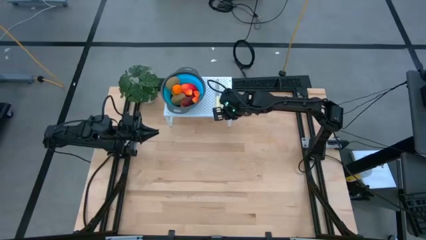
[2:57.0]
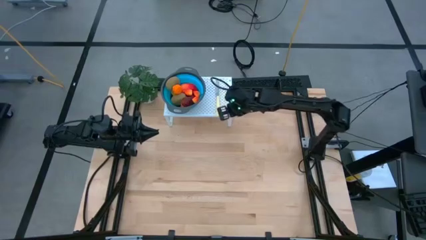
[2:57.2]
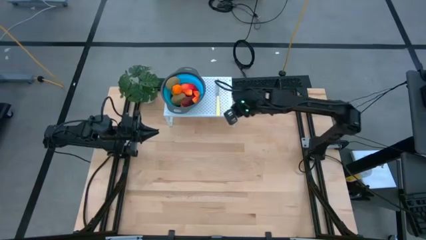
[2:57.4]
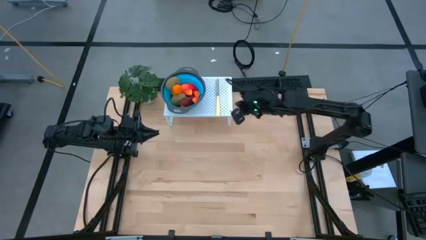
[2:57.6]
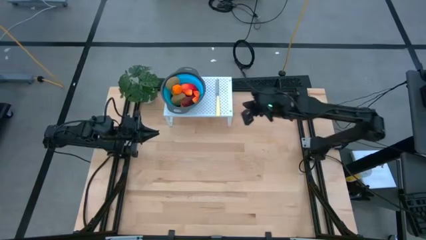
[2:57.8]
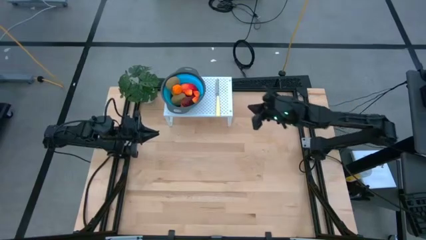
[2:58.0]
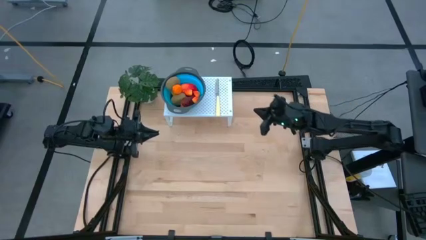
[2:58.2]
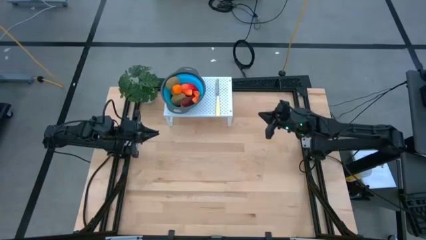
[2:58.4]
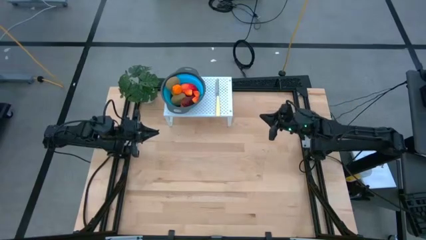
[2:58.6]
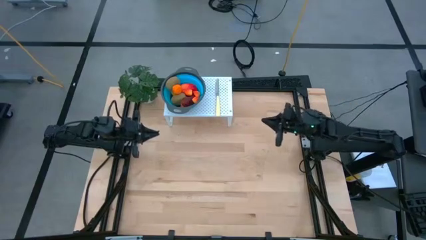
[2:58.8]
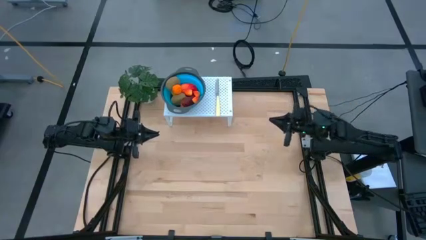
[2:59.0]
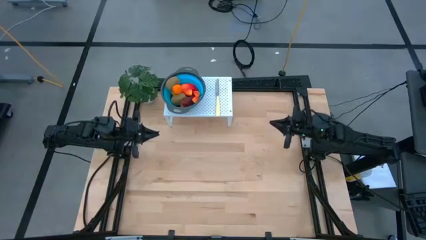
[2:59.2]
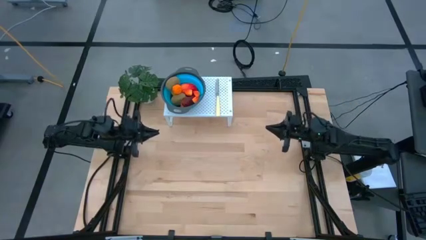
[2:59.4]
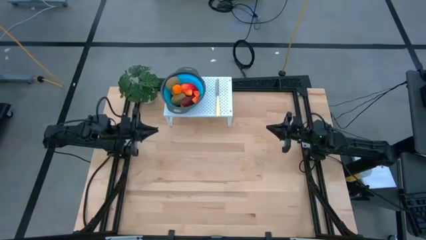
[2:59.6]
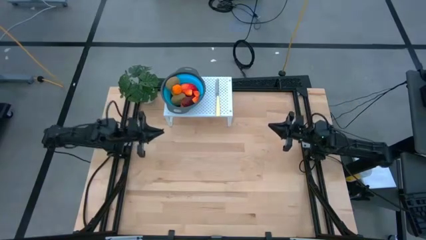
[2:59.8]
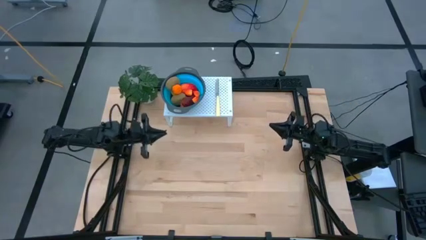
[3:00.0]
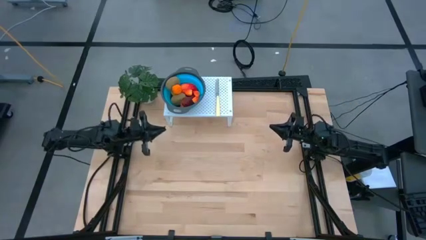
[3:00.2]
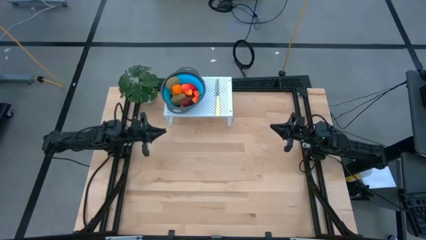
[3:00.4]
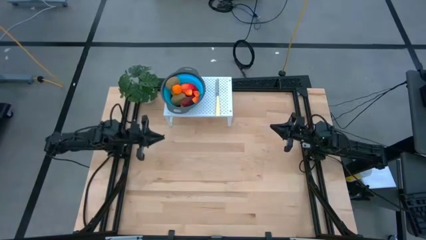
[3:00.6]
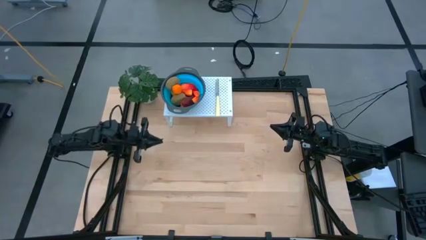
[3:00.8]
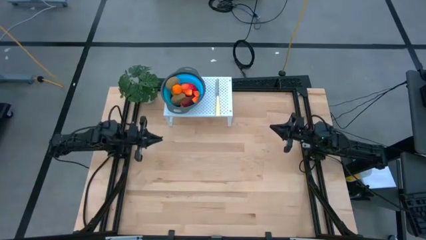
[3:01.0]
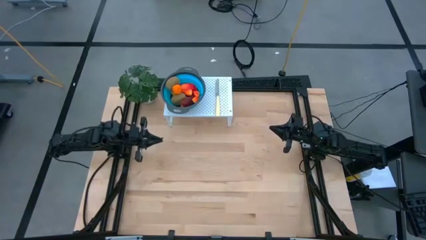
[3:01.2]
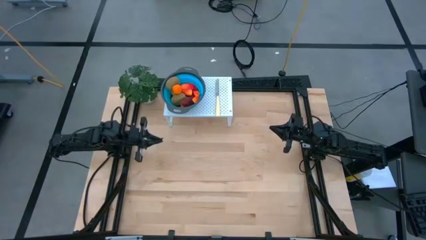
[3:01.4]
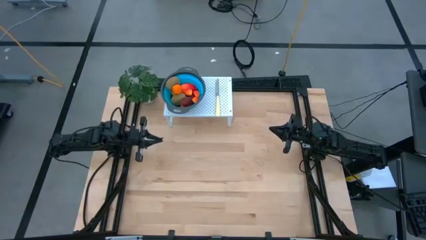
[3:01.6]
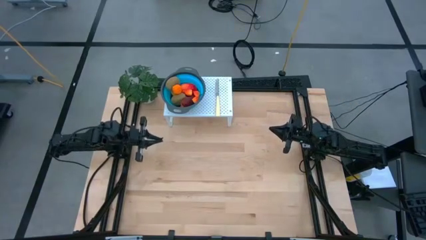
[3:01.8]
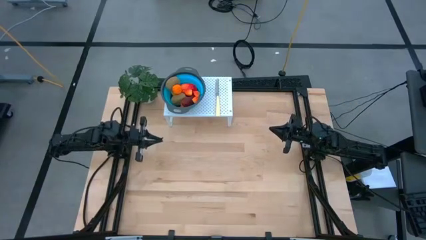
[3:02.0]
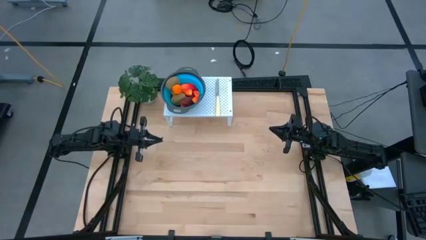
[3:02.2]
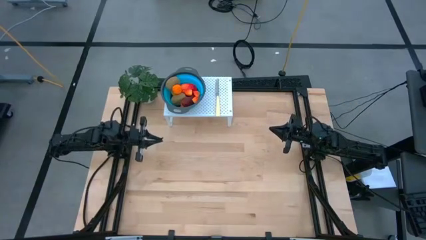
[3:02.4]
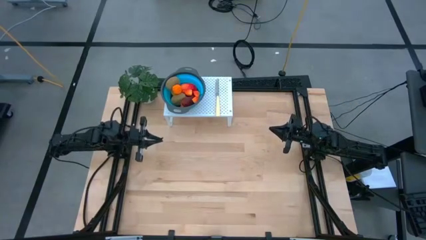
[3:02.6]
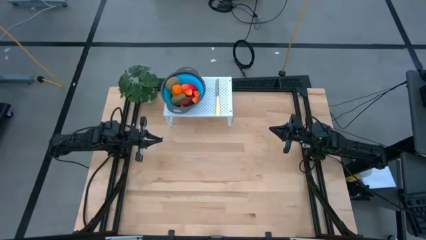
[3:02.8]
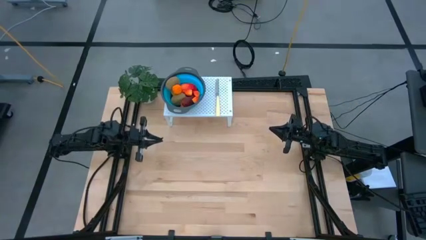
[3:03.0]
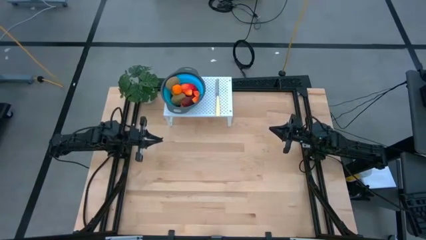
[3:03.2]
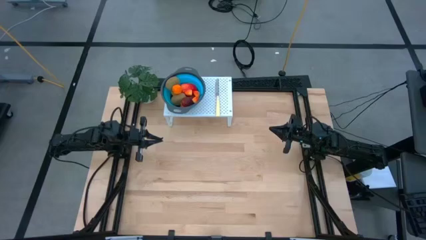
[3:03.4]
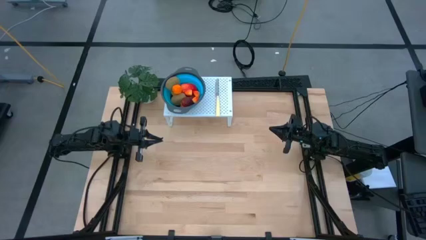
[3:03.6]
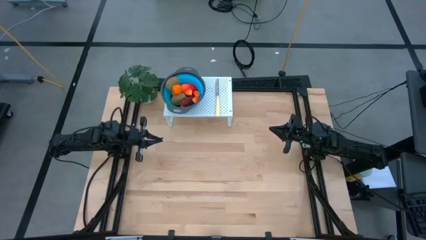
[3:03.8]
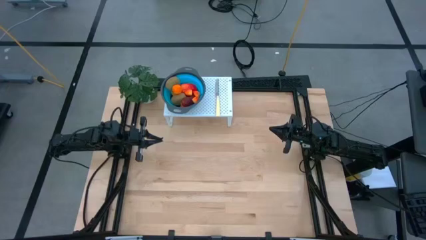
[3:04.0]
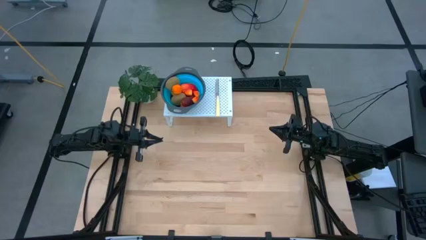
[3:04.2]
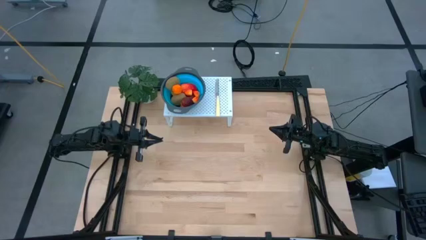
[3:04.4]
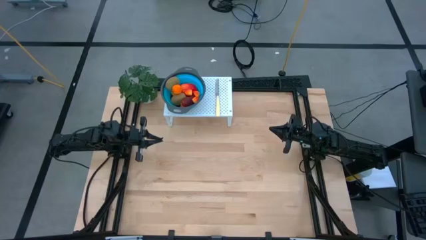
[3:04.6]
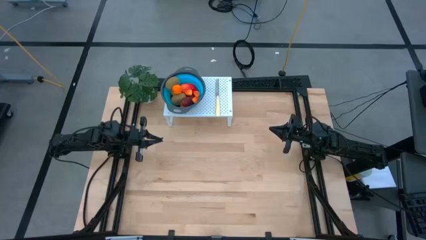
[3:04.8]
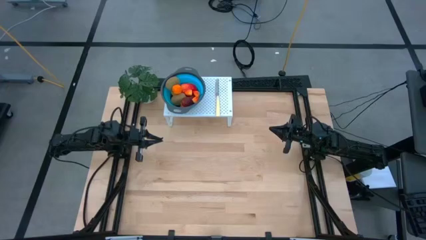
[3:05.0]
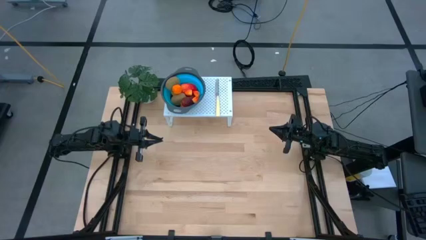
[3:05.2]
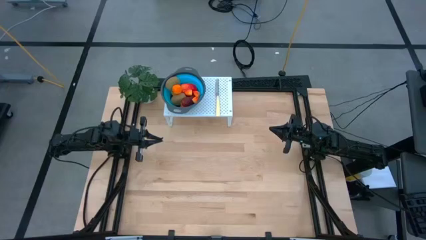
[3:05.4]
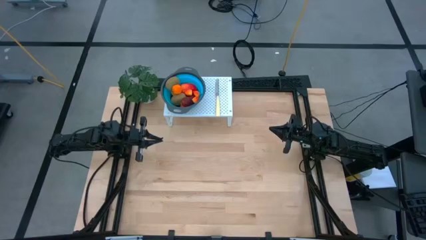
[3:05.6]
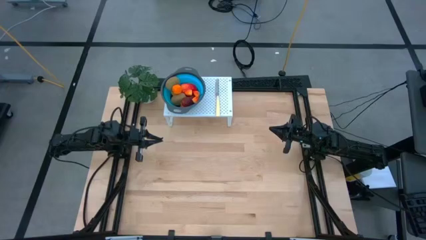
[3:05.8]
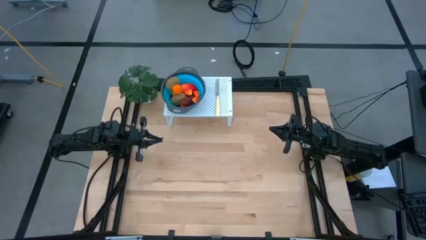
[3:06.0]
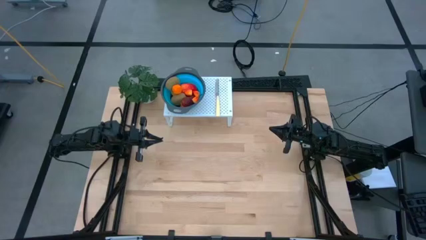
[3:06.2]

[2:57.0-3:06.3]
Task: Pick & Place Fruit
Return to Home Position

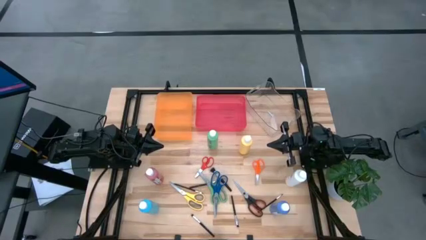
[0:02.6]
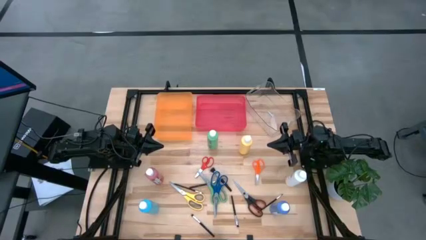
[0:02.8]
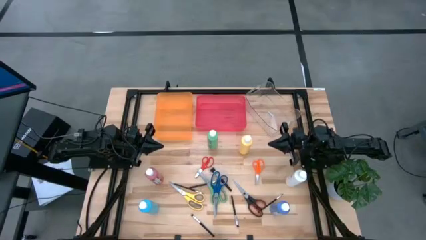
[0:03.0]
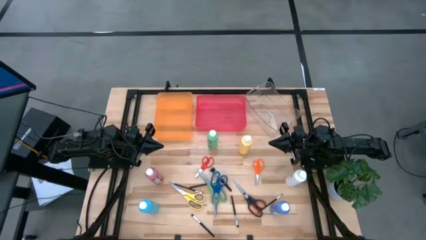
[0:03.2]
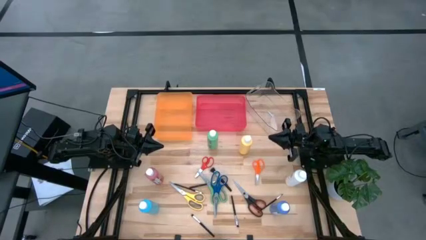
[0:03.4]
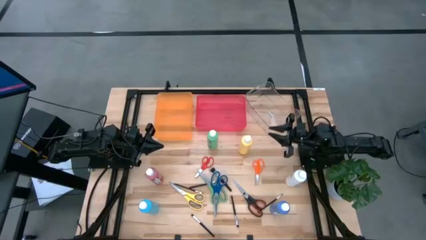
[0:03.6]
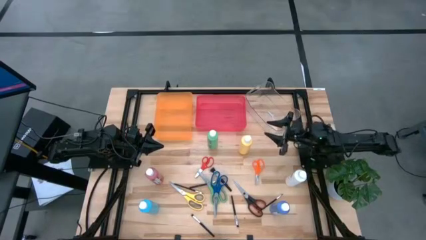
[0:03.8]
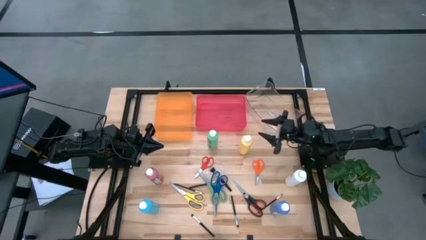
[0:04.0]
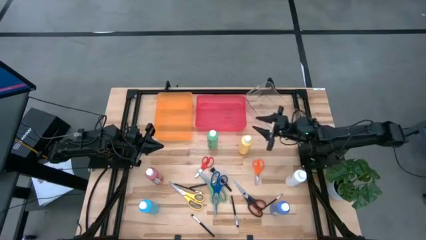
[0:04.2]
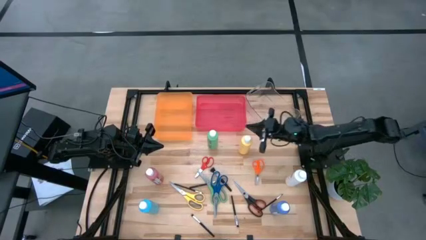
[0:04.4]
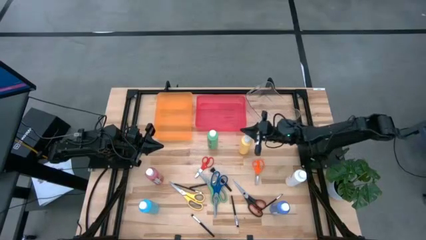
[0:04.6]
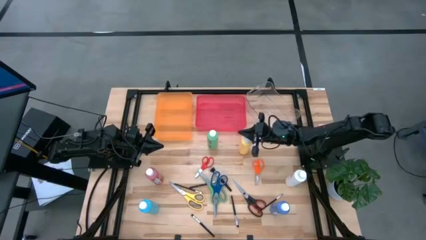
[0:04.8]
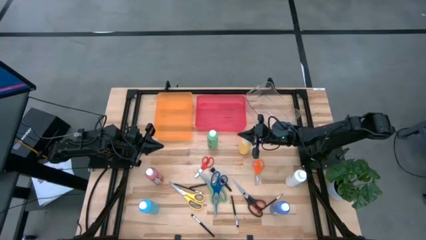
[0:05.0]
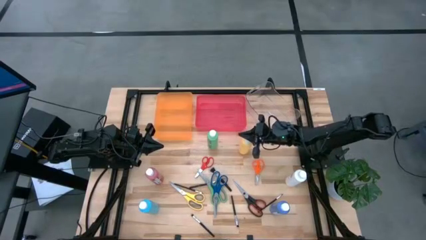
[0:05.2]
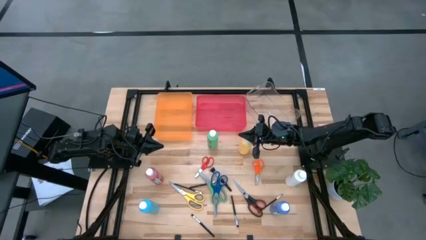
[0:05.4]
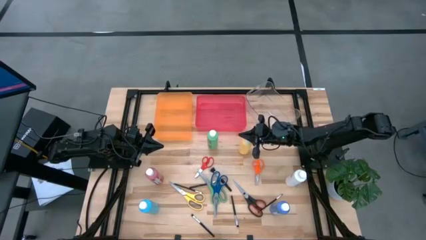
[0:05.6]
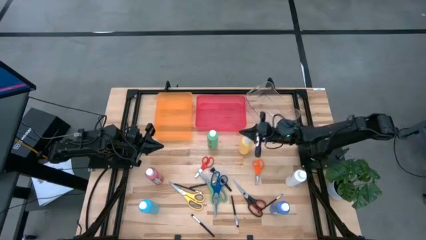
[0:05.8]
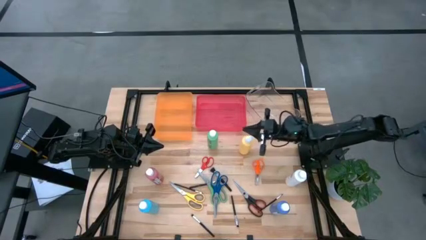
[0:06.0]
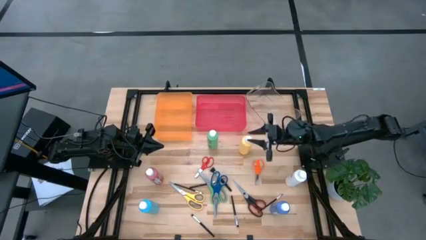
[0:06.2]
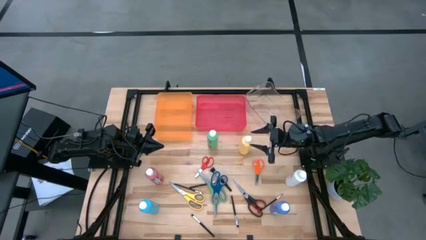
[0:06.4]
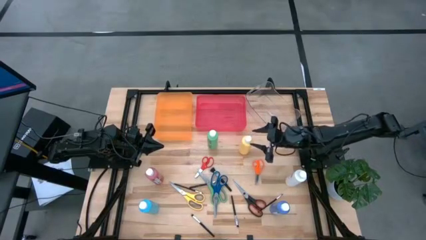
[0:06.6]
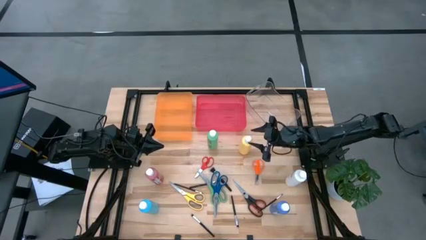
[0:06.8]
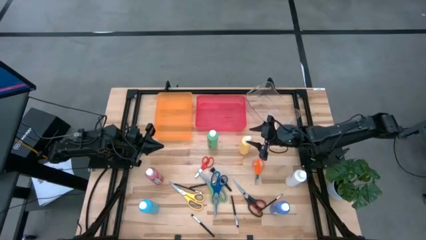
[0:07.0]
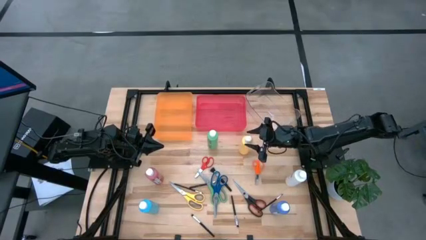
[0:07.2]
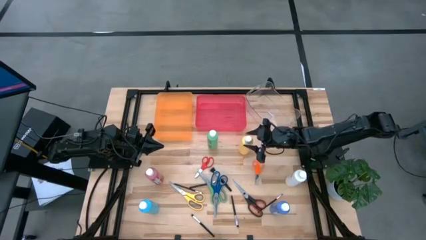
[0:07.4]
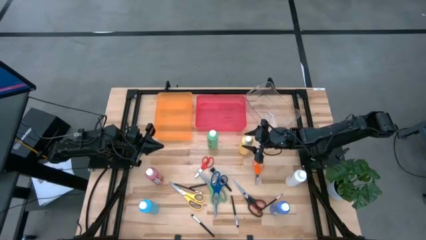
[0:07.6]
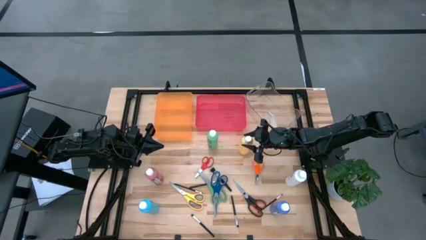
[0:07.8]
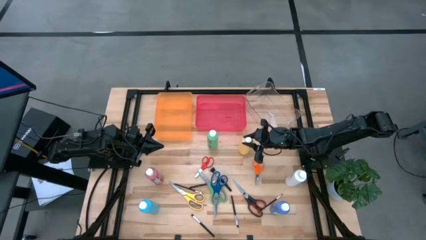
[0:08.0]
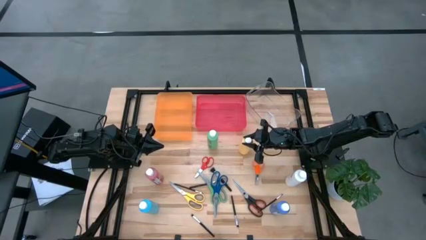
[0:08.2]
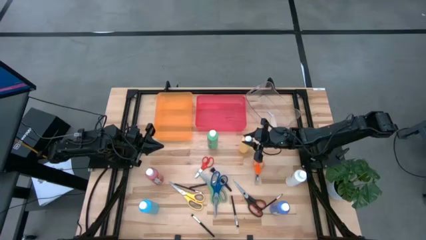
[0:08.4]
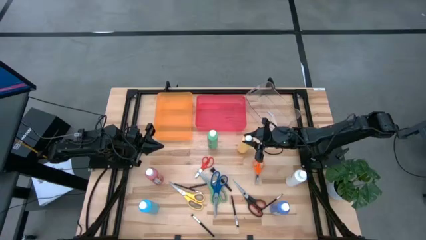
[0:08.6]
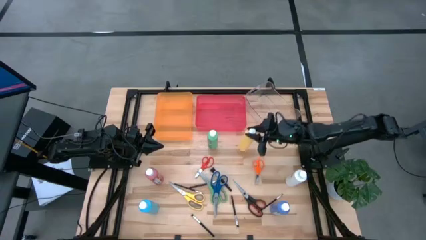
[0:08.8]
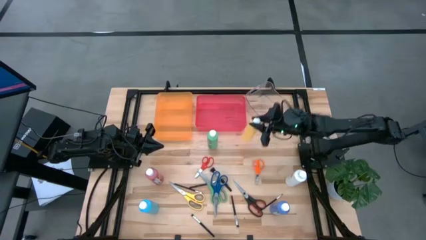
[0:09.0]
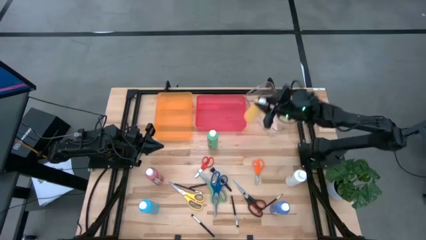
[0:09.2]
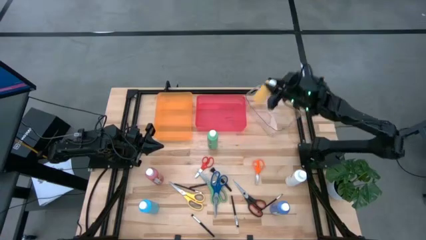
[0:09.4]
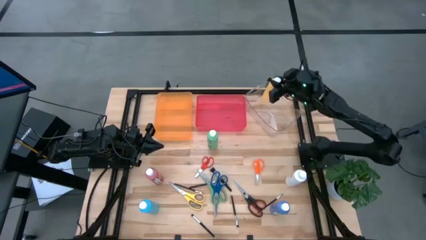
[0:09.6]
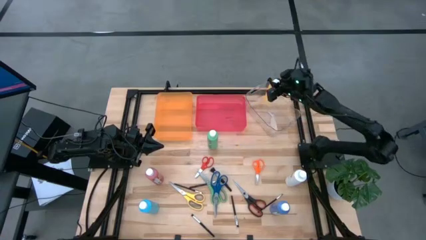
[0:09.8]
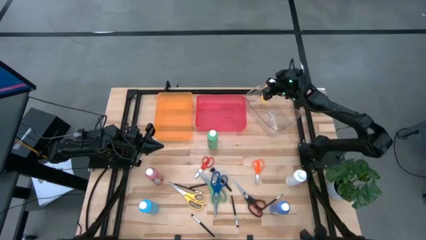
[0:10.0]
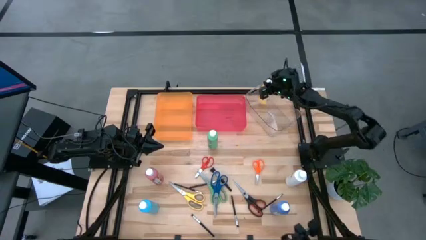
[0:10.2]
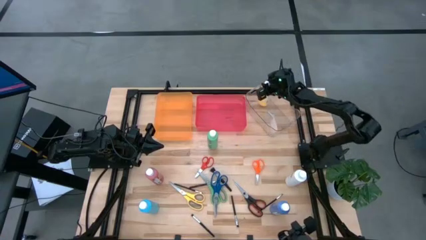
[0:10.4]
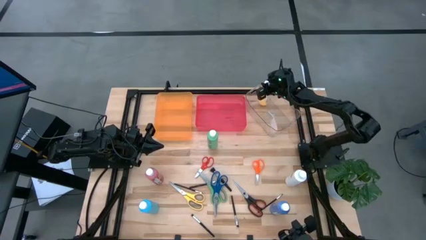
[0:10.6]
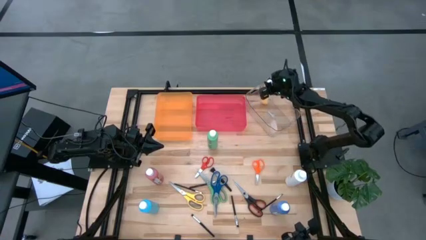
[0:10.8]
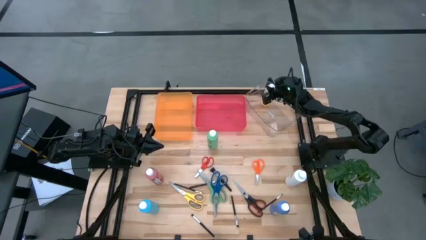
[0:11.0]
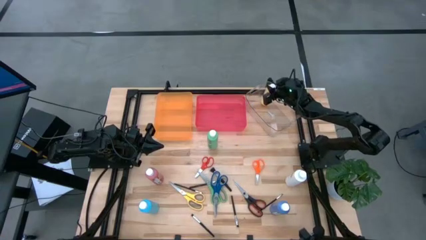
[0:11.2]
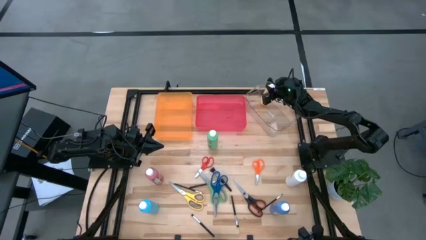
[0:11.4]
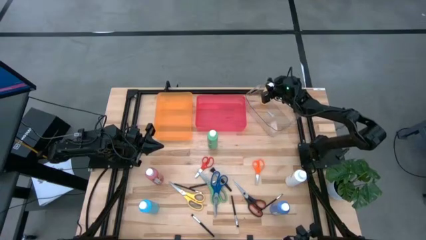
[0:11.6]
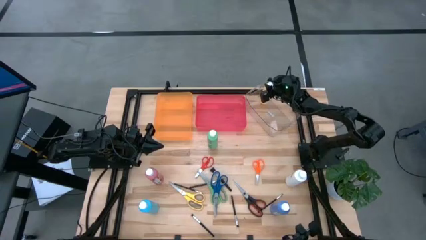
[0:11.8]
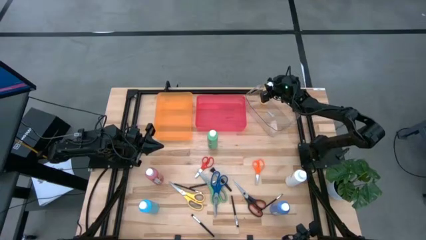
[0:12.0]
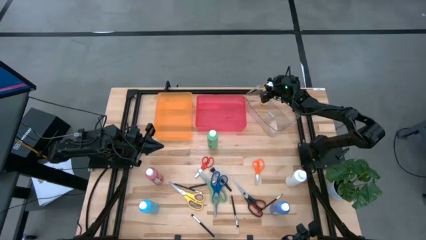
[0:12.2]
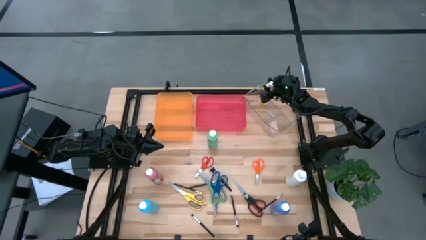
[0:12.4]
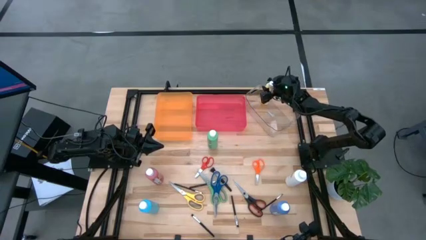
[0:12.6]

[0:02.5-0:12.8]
Task: Pick & Place Paint Supplies
Put the yellow paint bottle into the transparent bin
